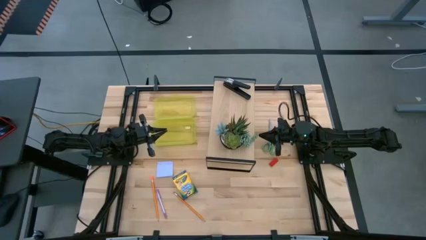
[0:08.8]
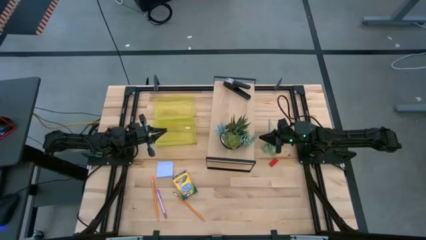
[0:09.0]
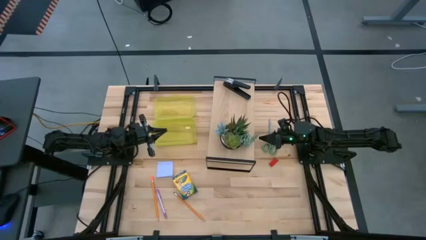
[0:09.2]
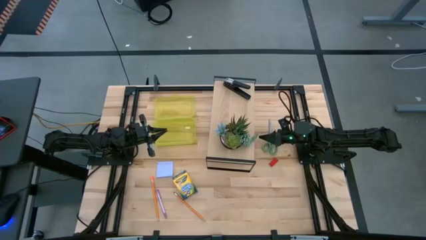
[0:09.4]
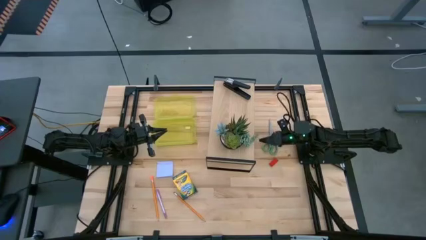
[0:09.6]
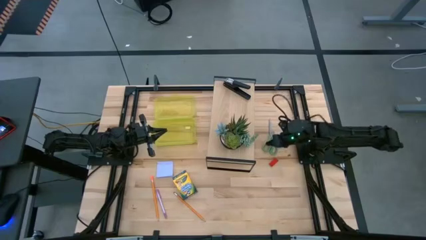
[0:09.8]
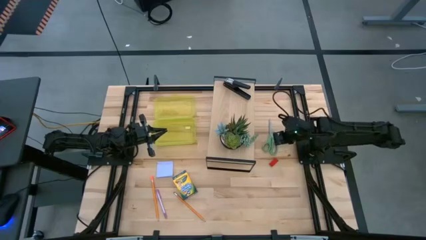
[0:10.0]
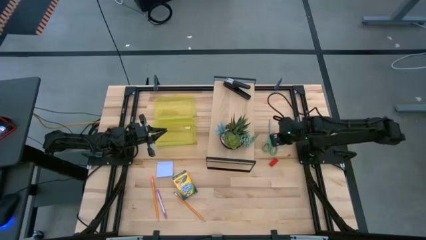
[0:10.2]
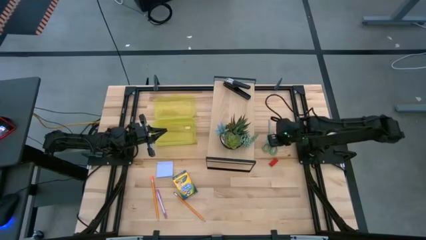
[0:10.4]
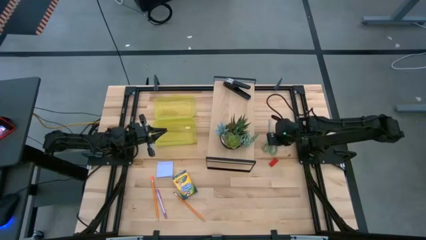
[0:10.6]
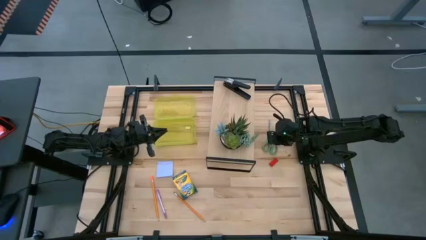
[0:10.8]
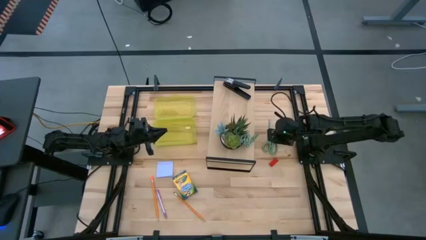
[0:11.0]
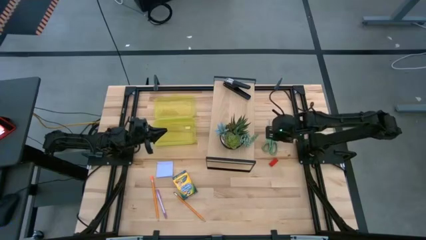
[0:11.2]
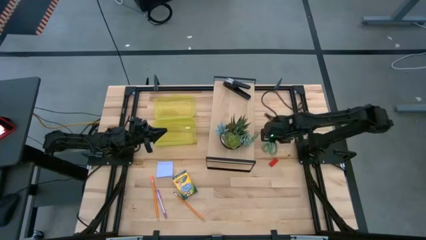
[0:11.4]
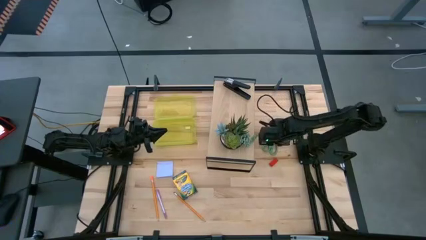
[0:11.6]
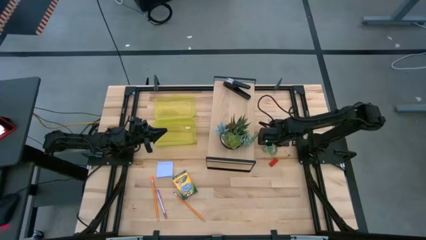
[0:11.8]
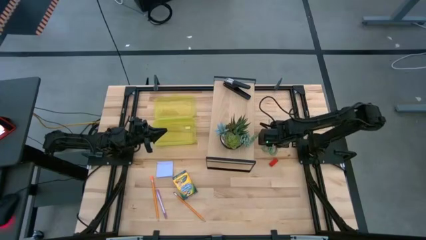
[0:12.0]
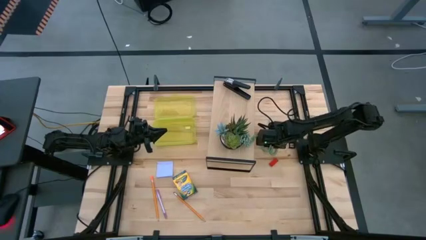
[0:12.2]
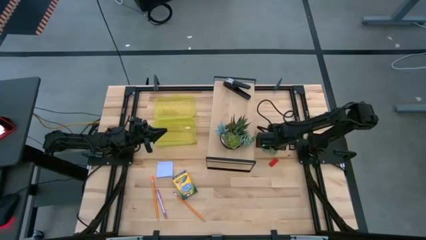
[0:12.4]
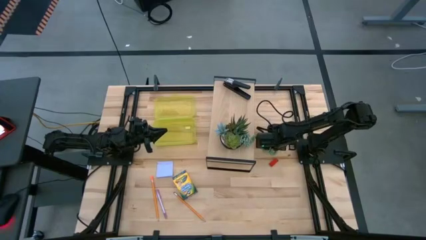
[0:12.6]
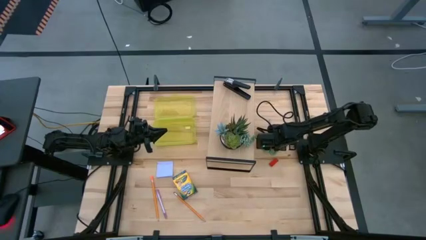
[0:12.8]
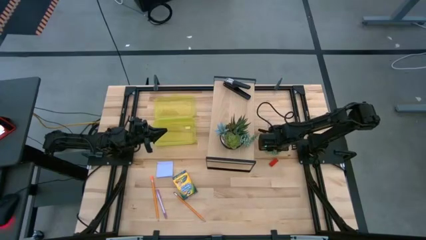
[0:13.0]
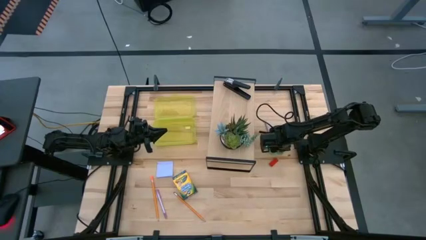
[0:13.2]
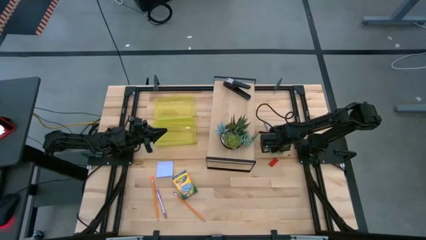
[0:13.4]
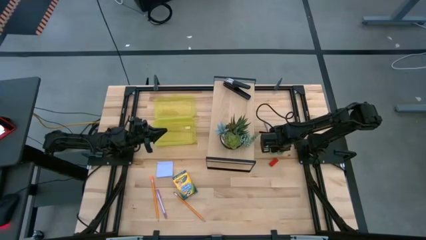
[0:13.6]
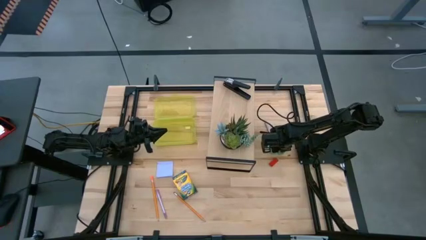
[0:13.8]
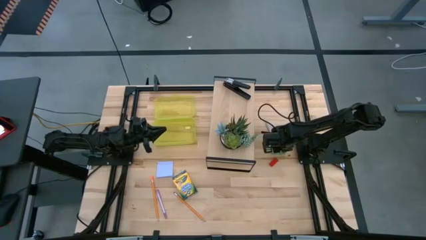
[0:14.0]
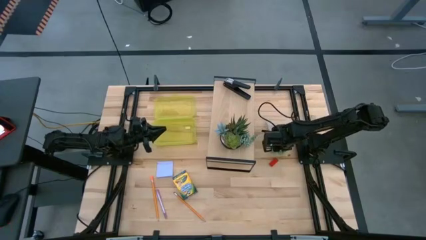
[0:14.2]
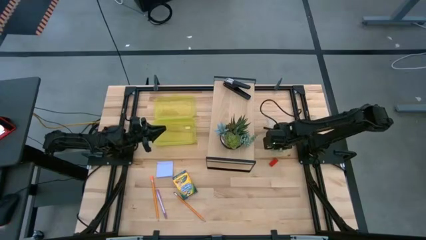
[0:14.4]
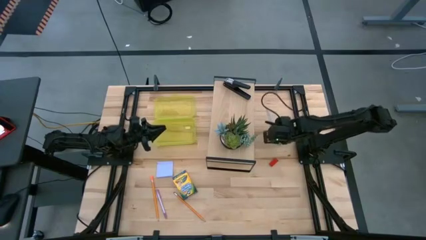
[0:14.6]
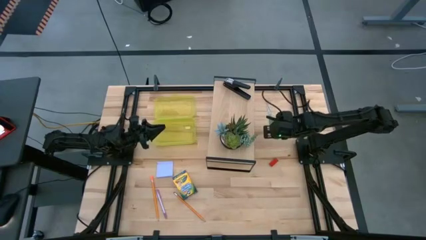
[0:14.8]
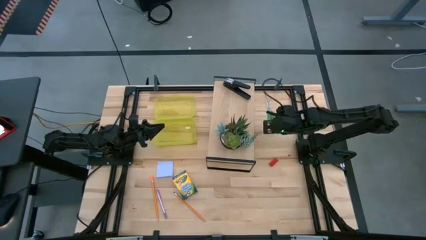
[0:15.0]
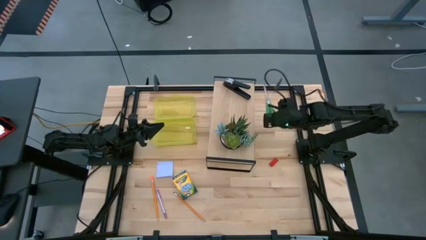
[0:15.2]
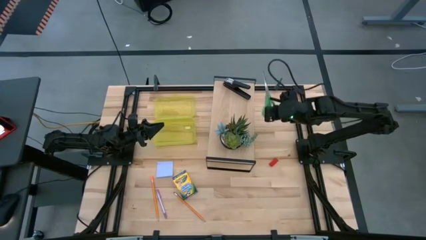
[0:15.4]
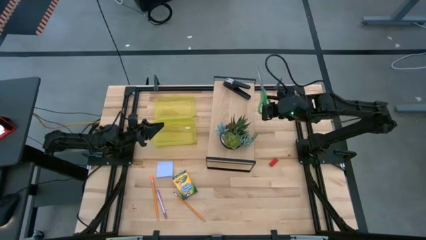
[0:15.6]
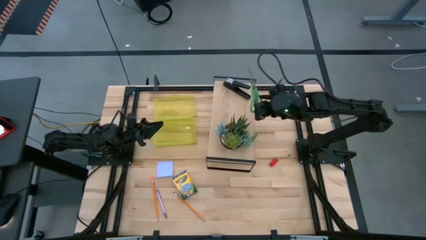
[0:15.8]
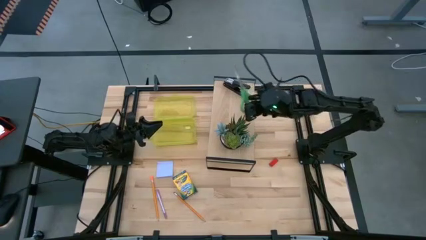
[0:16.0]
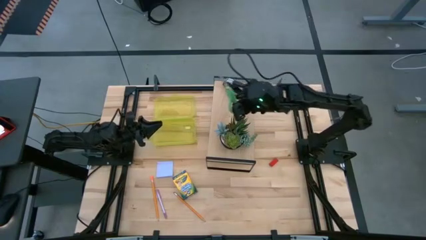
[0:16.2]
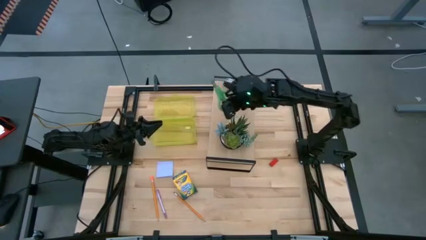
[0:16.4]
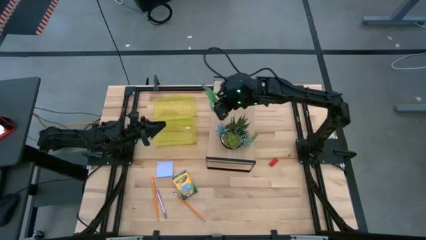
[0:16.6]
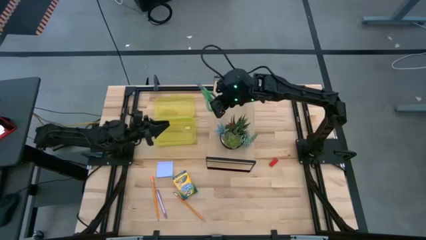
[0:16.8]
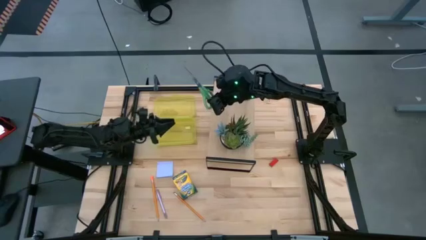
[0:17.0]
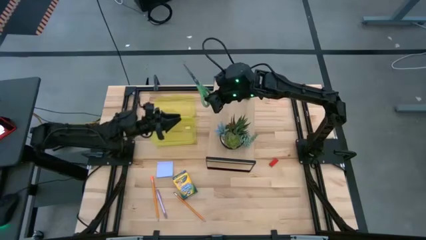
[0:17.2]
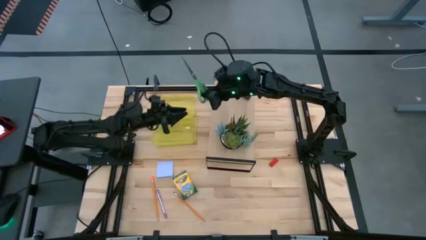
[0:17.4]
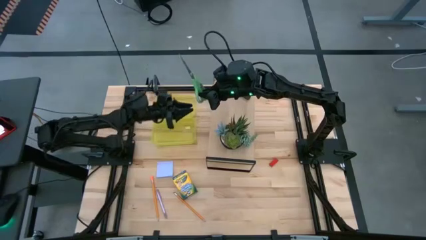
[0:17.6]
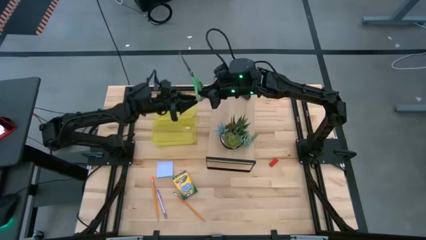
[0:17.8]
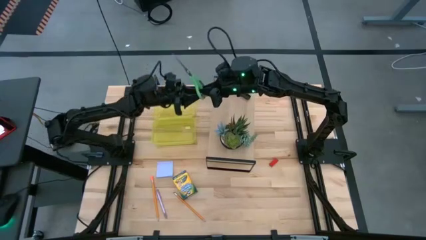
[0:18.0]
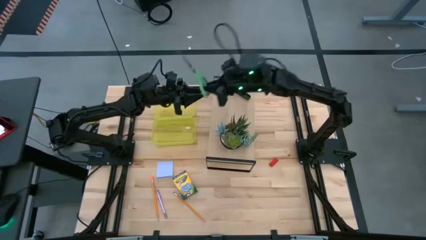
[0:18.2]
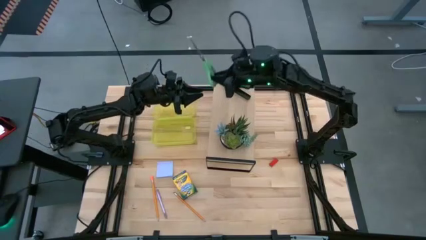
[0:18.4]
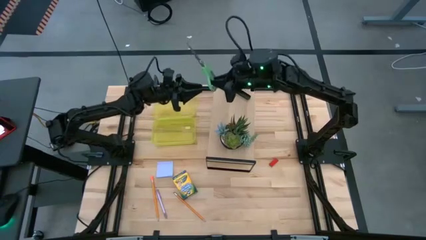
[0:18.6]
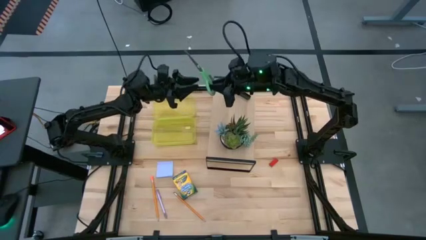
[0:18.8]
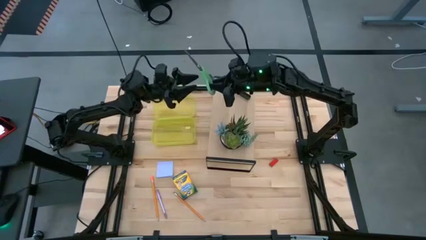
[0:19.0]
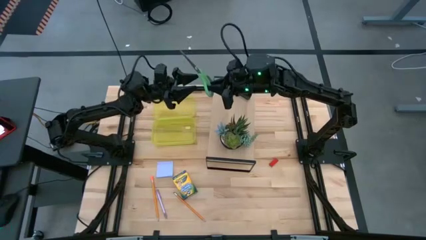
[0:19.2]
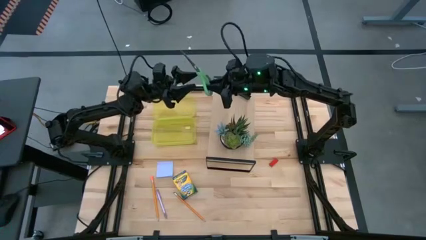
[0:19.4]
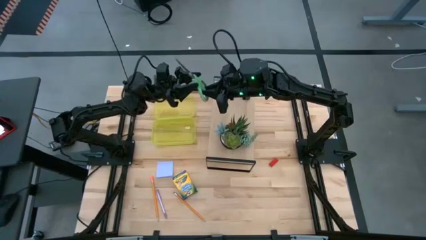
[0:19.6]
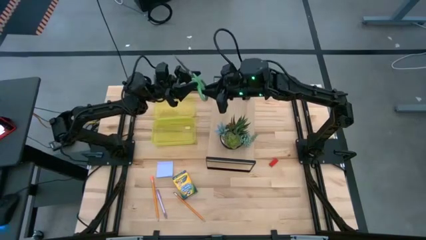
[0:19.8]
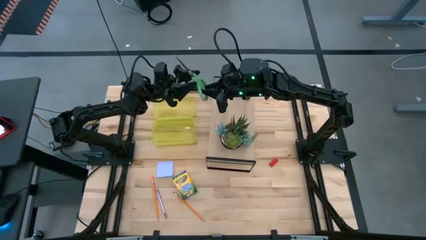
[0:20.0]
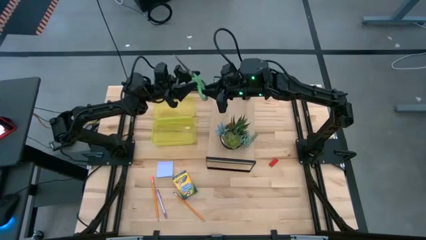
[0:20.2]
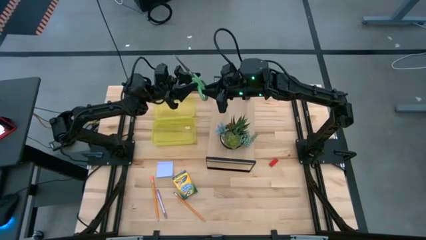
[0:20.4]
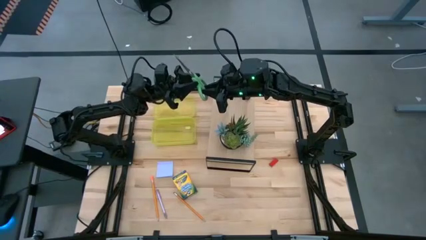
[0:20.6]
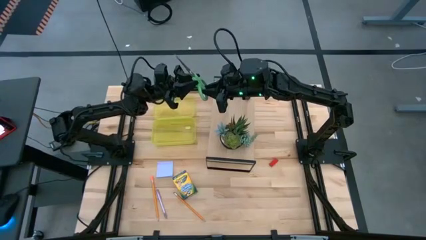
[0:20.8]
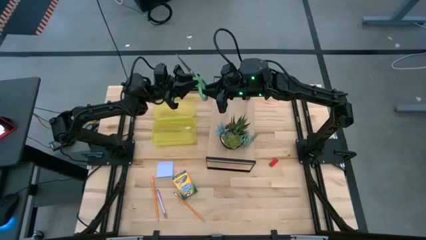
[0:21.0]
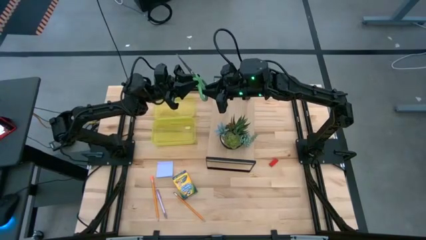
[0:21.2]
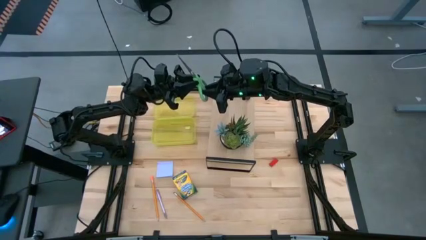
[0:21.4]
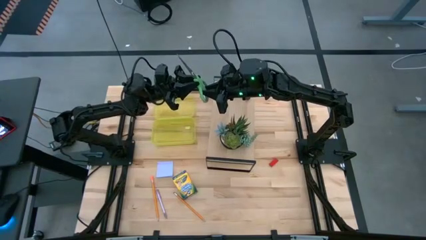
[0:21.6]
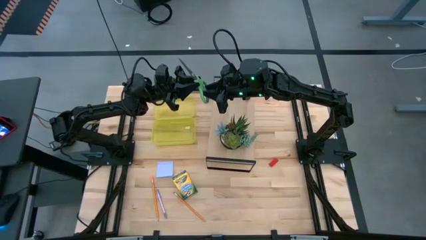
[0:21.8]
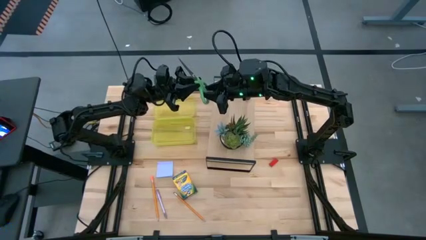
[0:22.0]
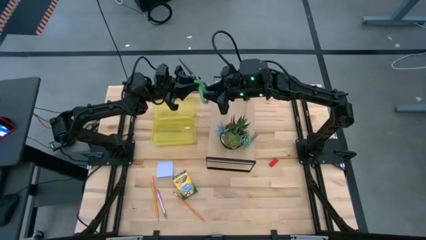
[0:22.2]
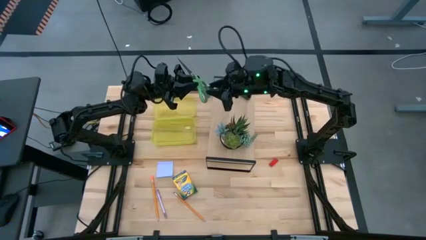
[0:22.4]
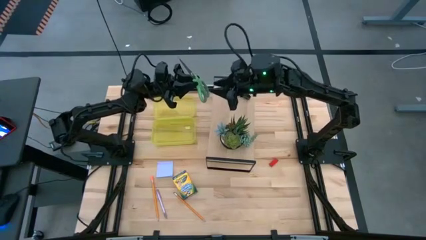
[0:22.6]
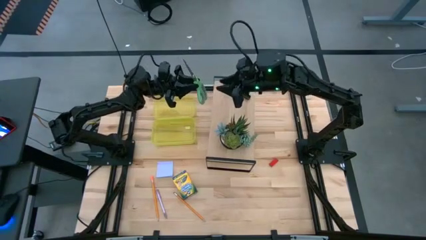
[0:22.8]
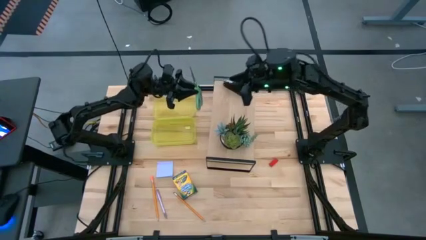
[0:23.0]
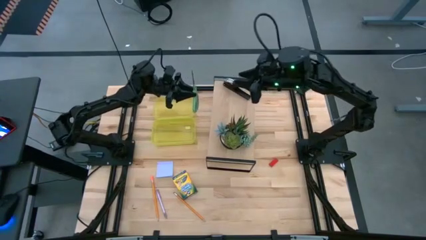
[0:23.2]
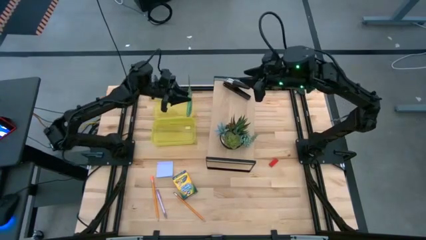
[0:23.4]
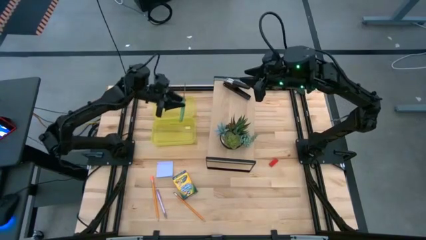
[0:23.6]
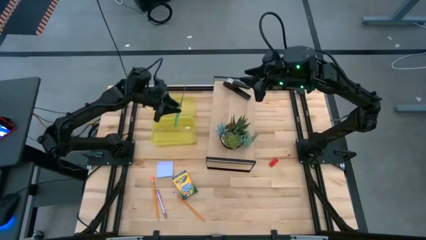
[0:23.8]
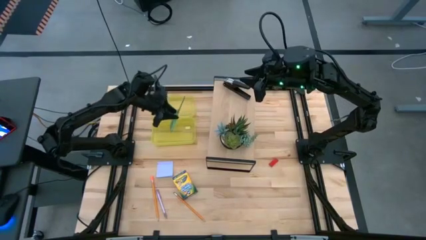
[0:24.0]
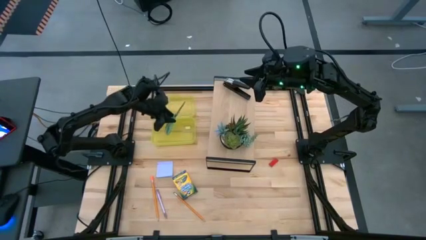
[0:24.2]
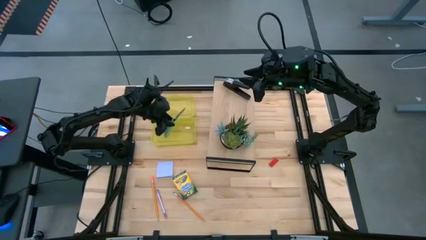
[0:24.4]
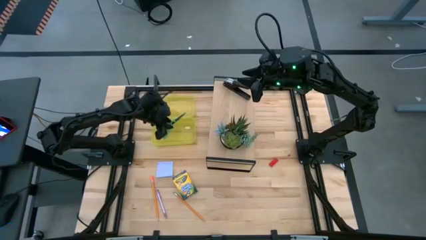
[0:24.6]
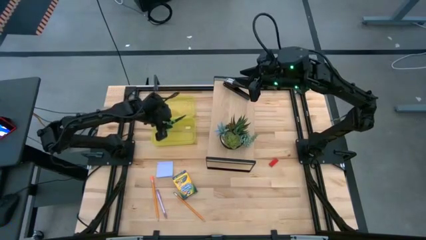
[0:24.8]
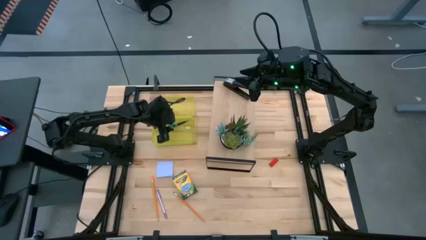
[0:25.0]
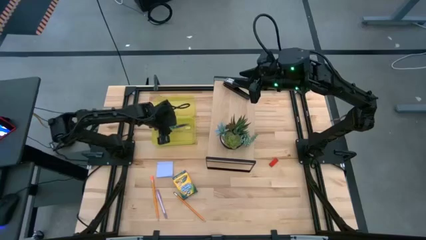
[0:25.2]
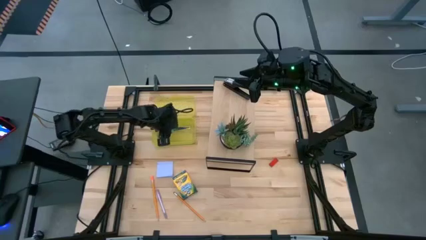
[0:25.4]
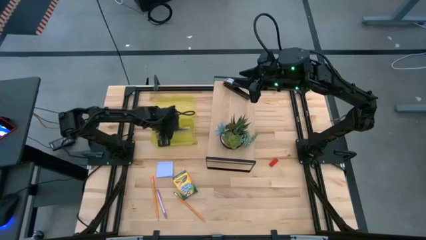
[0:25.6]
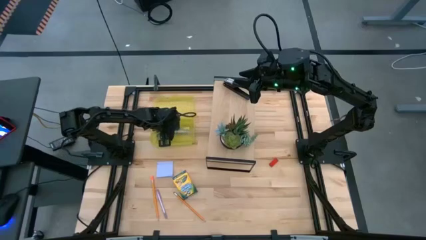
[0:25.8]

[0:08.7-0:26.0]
Task: Pack school essentials
Put the green scissors into the yellow supply box
